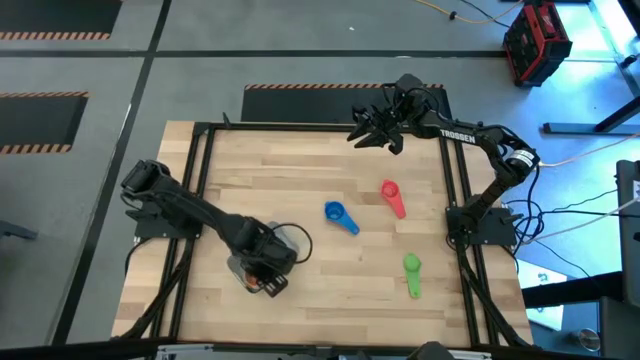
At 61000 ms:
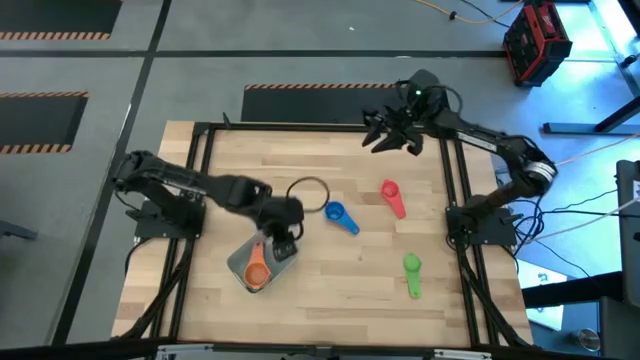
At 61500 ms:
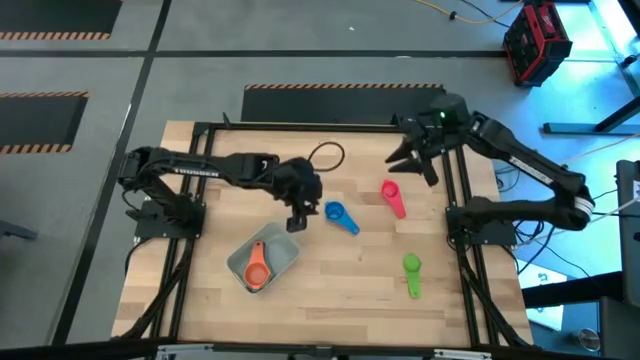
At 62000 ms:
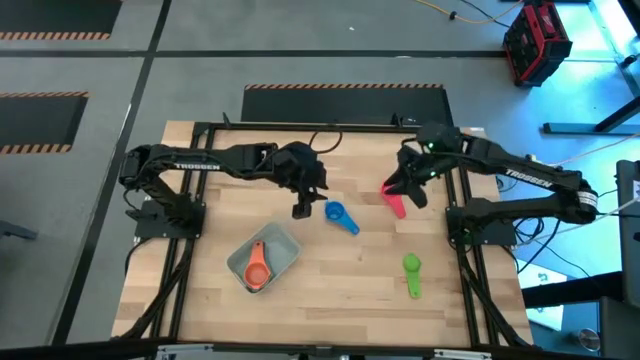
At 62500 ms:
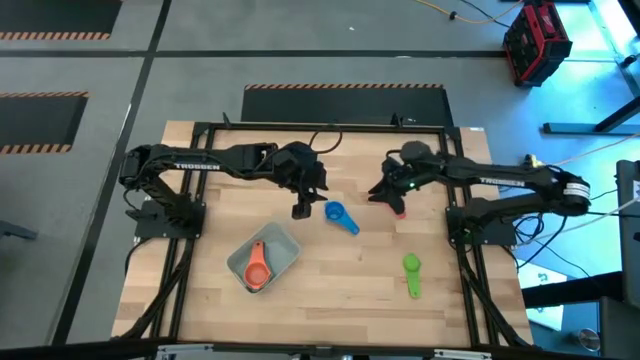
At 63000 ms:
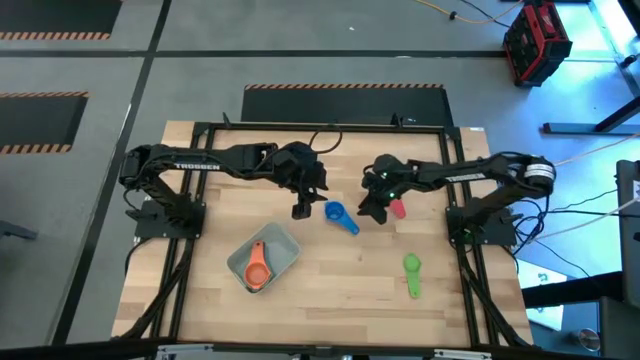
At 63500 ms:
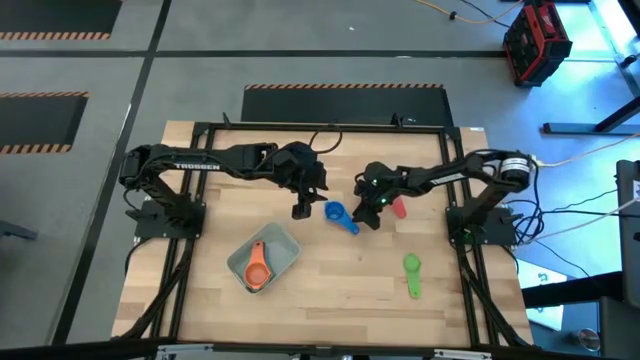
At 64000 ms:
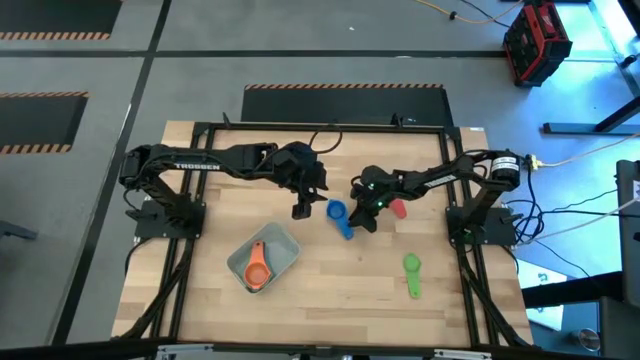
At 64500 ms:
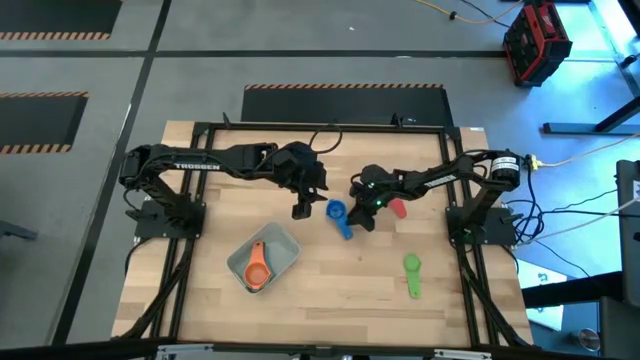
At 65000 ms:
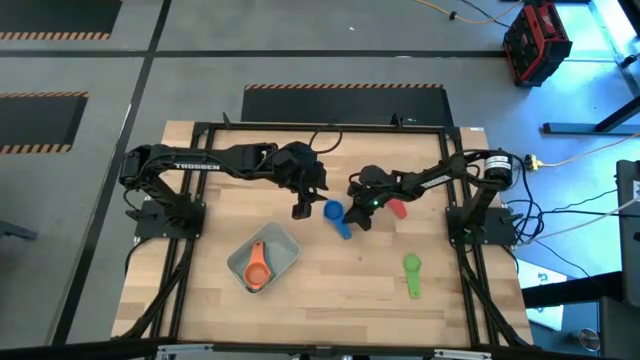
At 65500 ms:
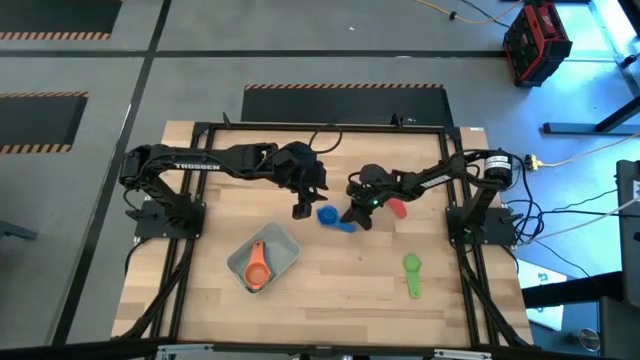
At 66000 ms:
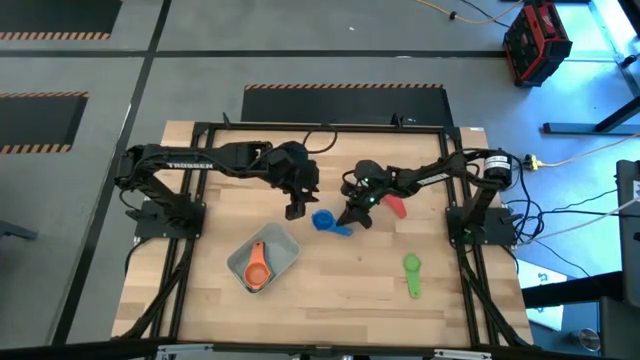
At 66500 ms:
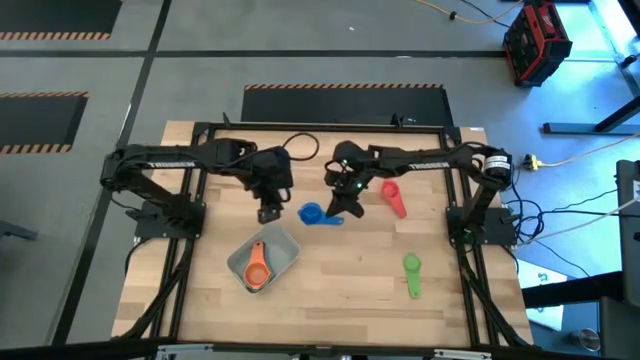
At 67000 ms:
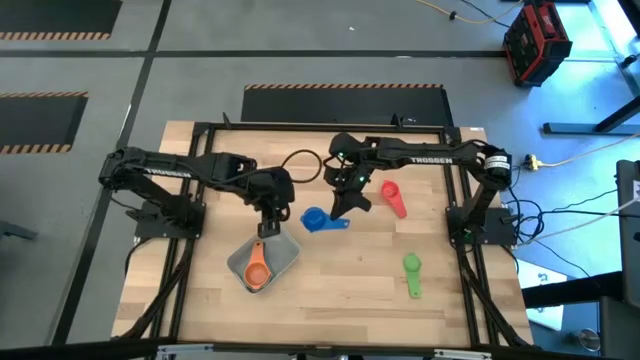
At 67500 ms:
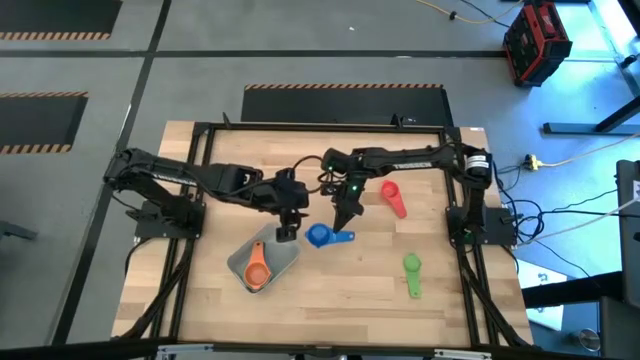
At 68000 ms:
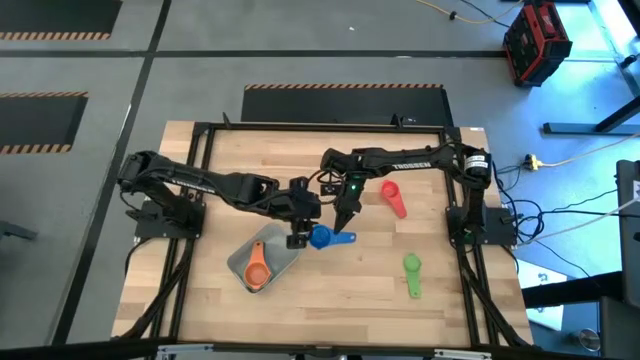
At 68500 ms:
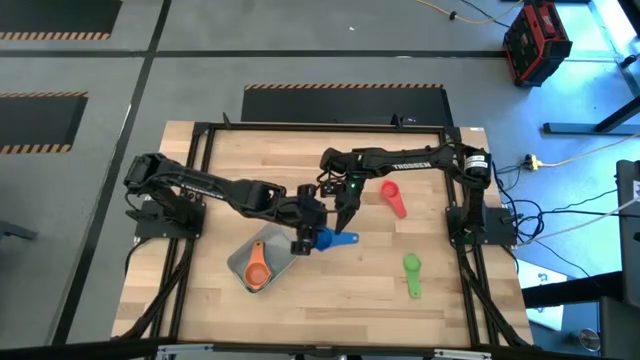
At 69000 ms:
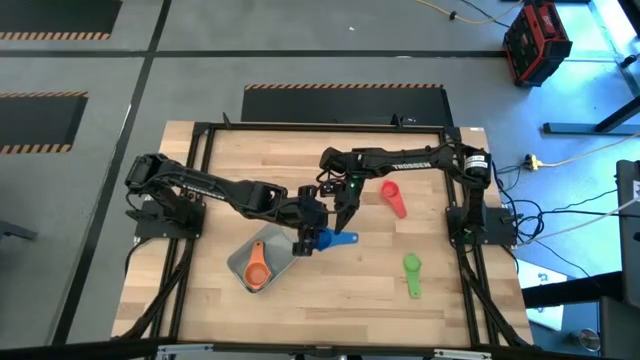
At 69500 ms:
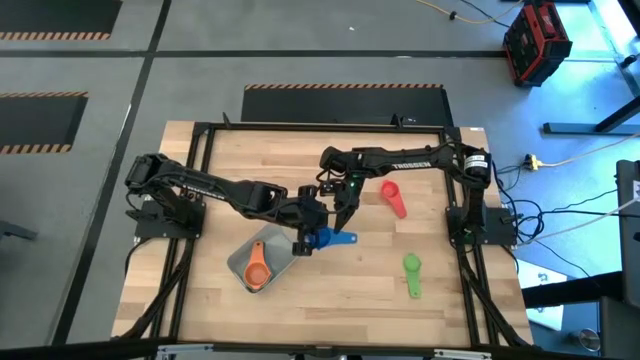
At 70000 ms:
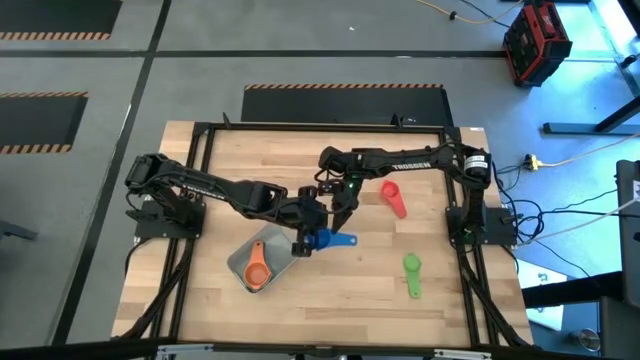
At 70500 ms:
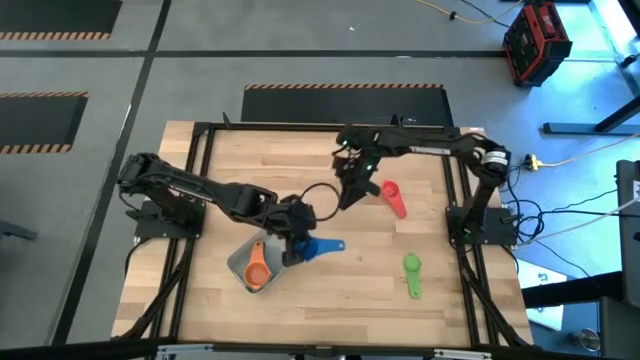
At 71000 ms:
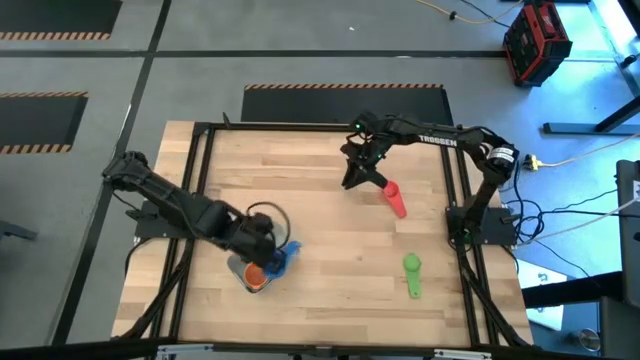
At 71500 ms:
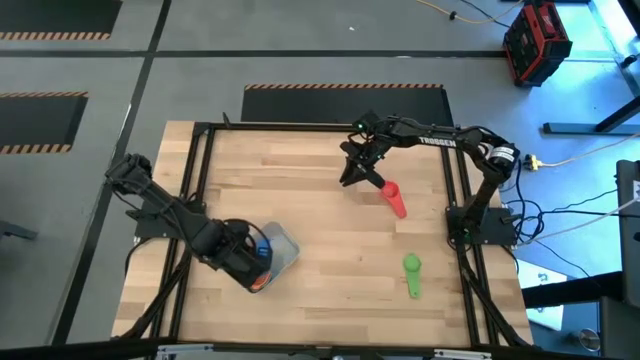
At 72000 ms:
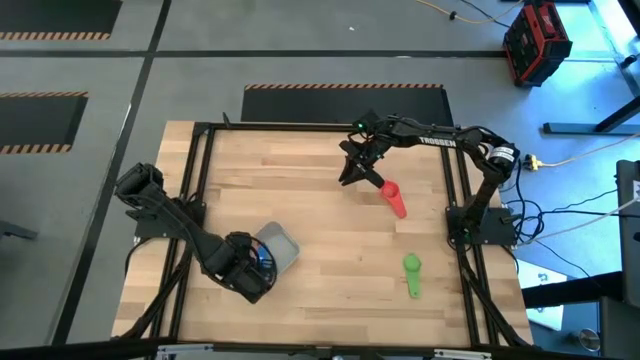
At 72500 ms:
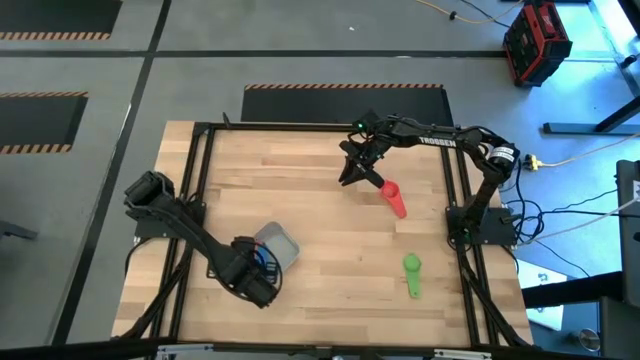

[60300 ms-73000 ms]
Task: Nest measuring cups in basket
Stack the blue measuring cup on the orange measuring cup in the gray bin

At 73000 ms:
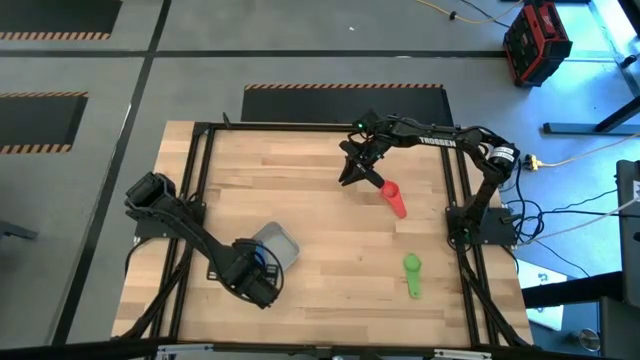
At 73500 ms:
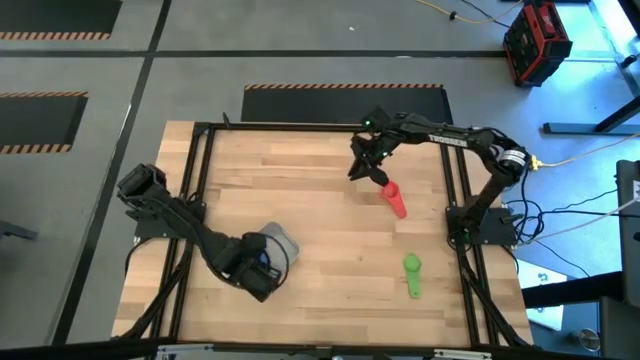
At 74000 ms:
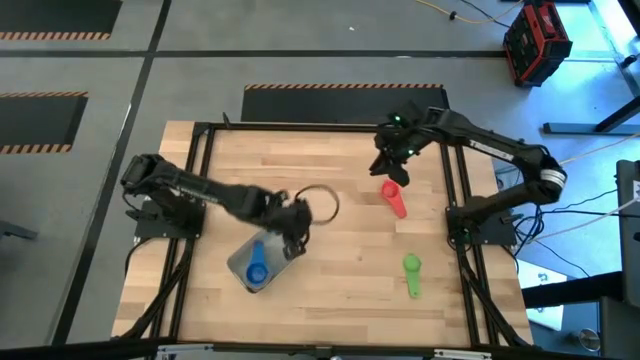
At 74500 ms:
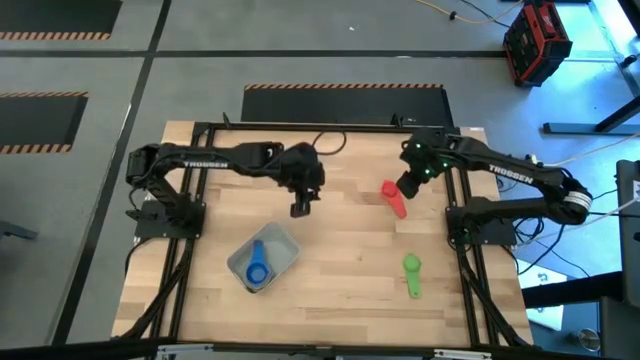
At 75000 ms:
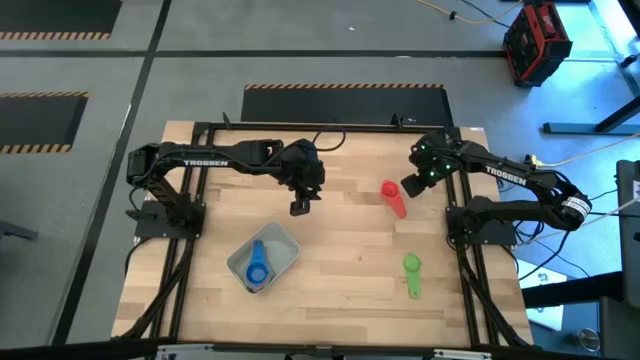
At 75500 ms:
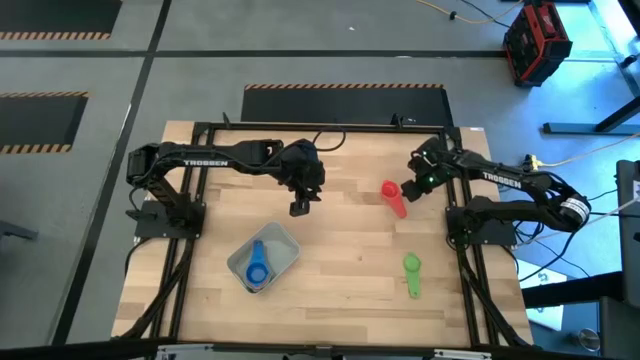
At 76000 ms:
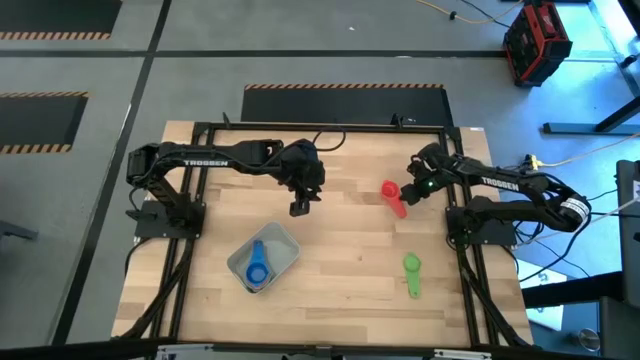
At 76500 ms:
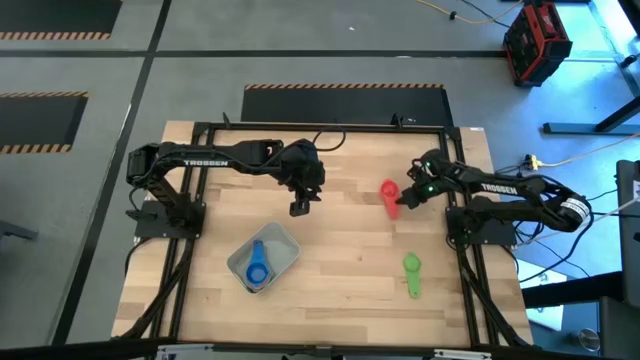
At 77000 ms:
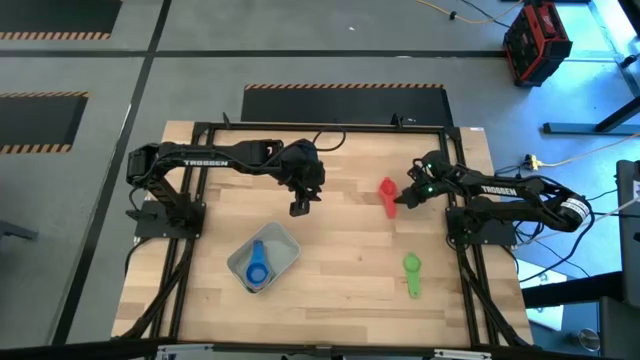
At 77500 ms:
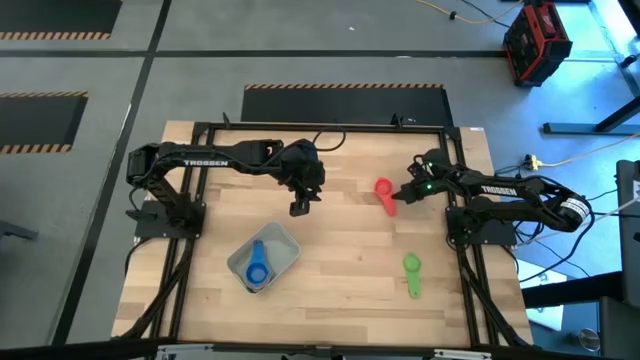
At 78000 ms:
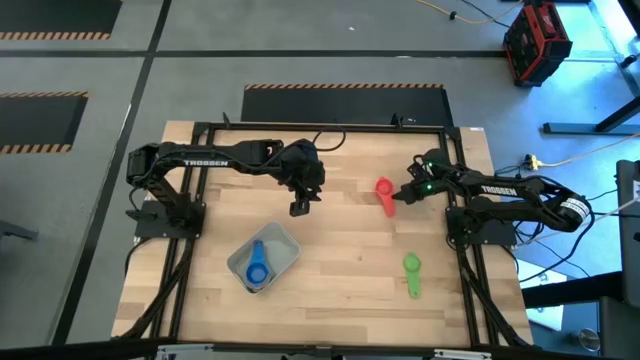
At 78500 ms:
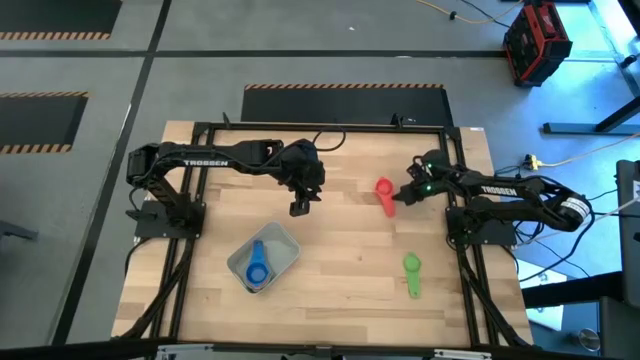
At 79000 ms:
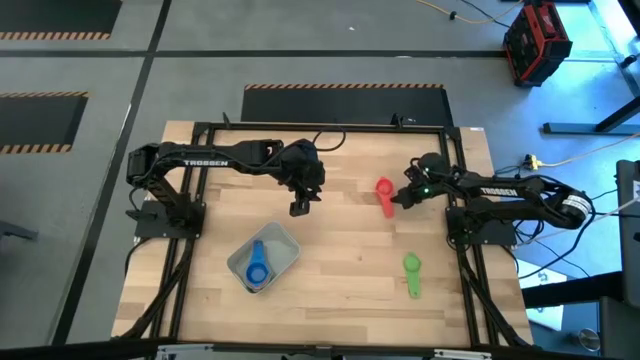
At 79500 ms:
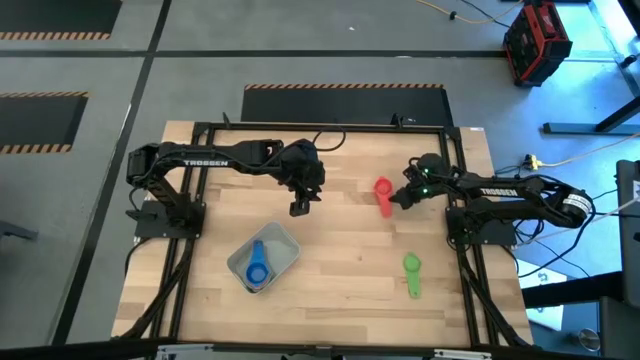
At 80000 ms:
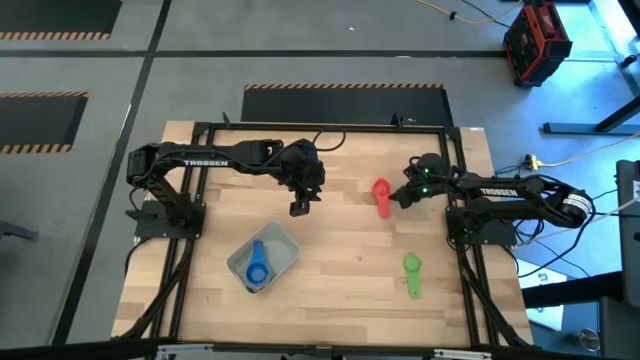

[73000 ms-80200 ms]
Stack the red measuring cup on the blue measuring cup in the gray bin
